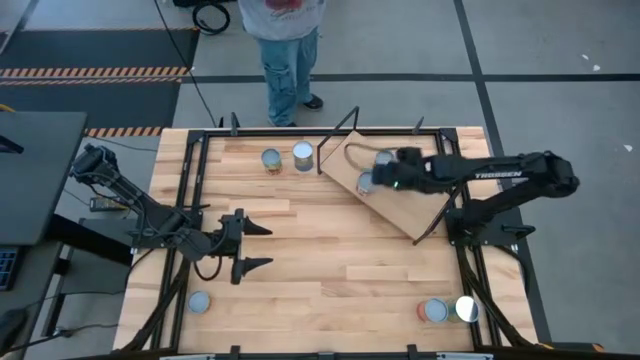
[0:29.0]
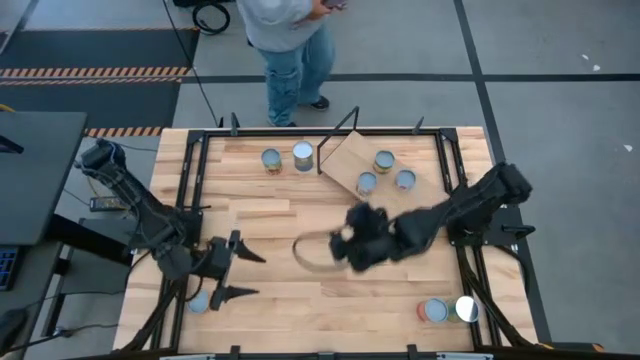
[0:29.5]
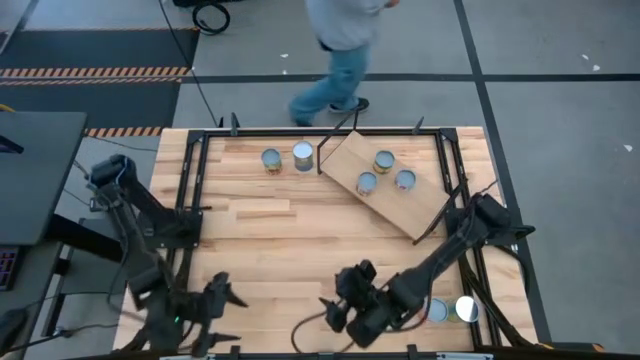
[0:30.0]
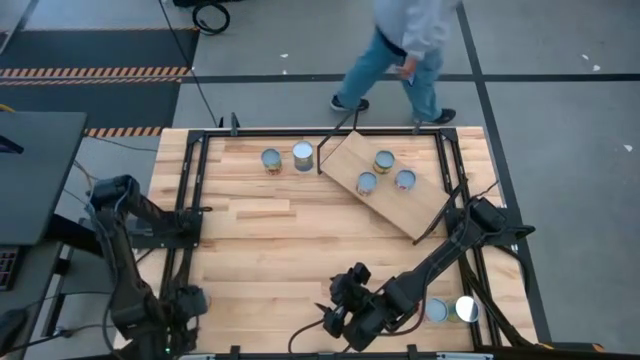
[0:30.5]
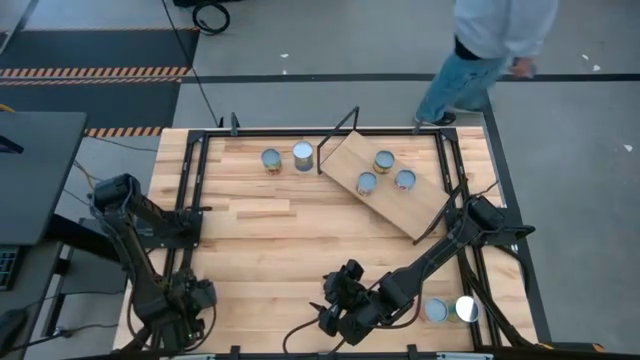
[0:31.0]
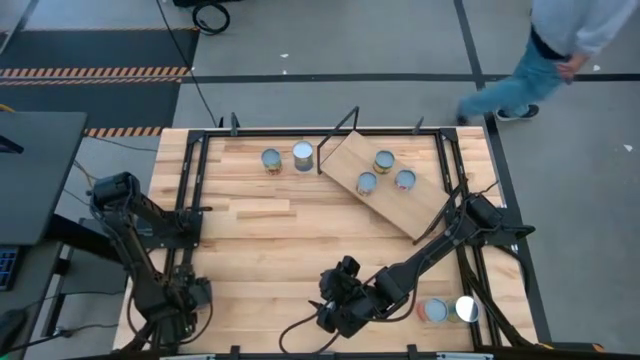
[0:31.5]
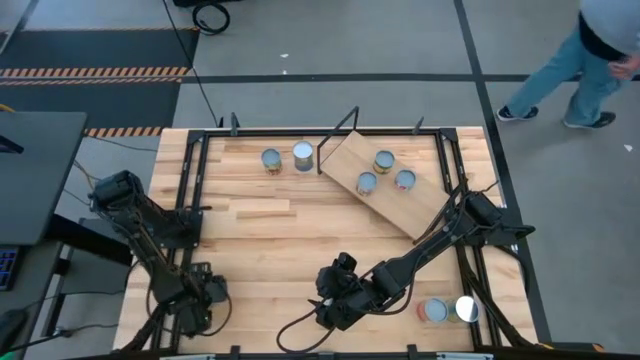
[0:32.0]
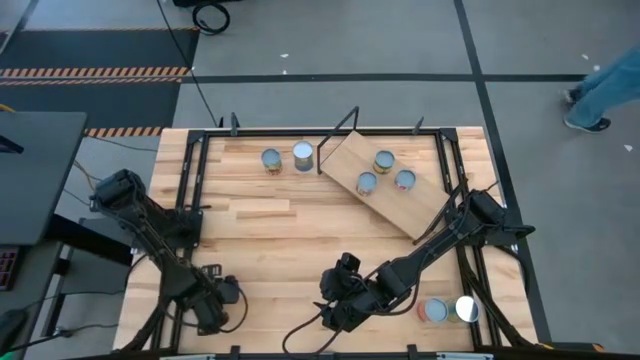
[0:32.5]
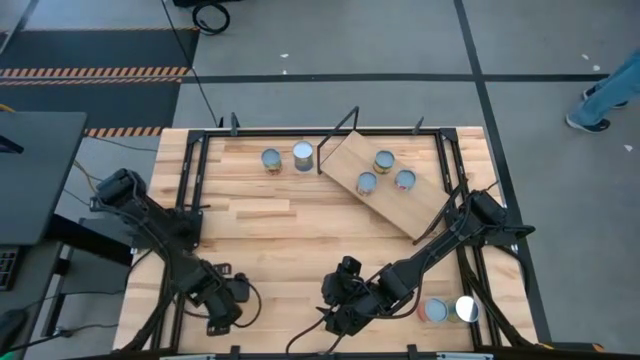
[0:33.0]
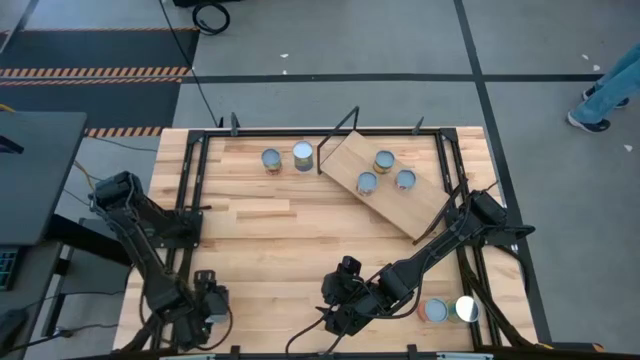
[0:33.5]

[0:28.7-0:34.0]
Task: Pick and place cans onto a shelf
Put the canned pineapple rings on the shelf

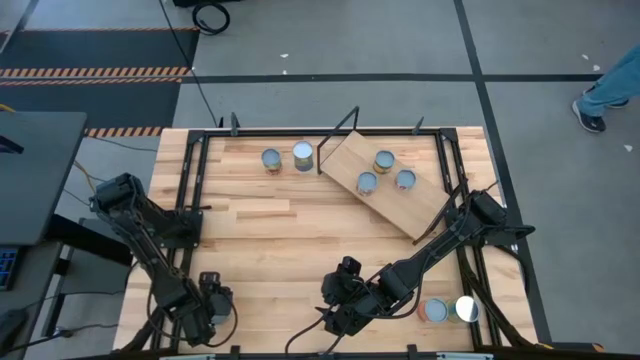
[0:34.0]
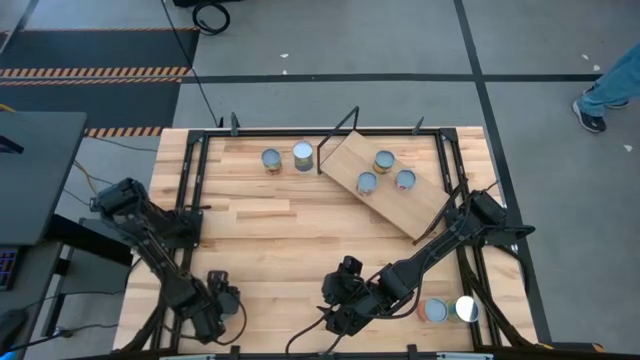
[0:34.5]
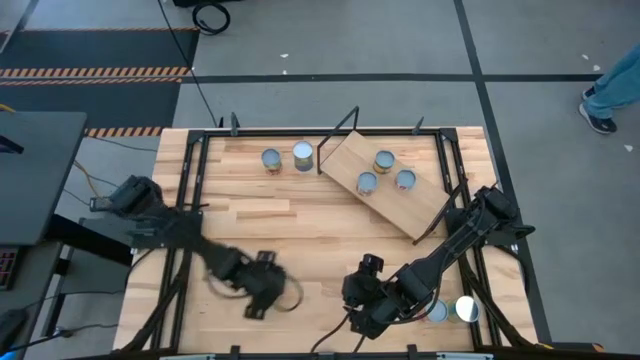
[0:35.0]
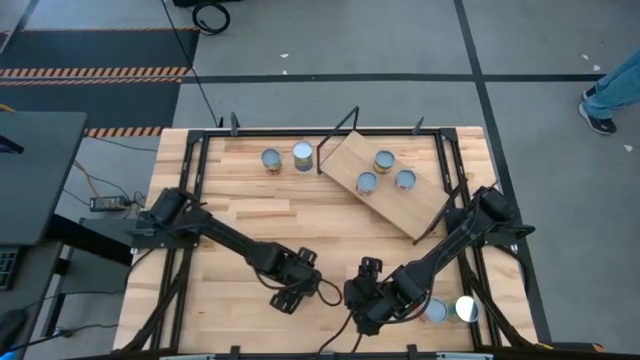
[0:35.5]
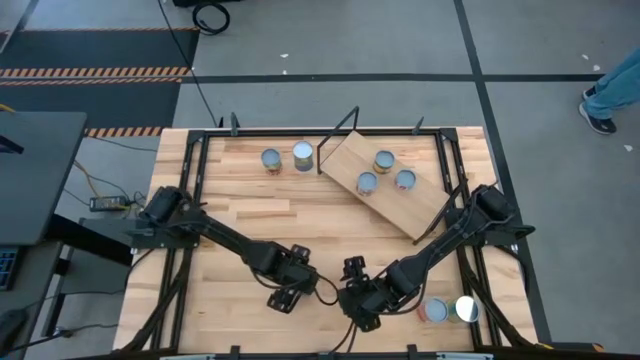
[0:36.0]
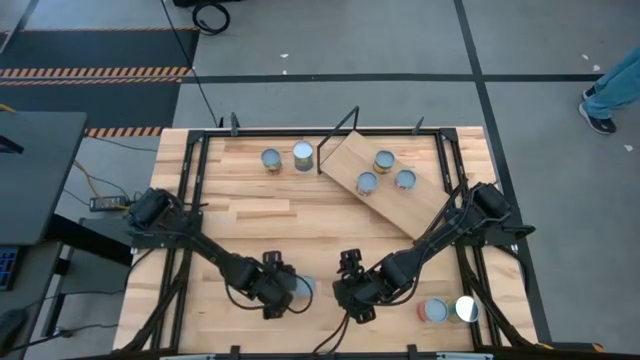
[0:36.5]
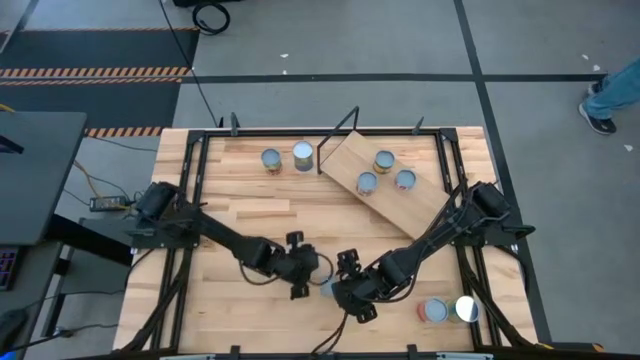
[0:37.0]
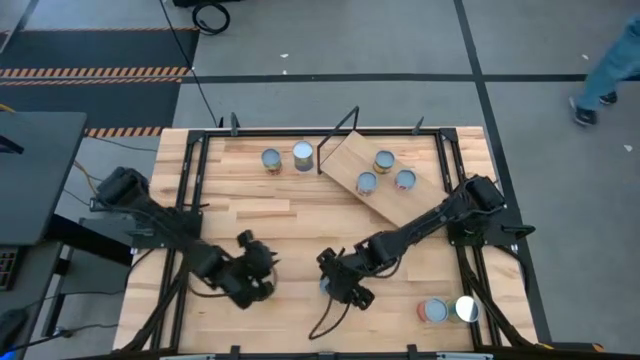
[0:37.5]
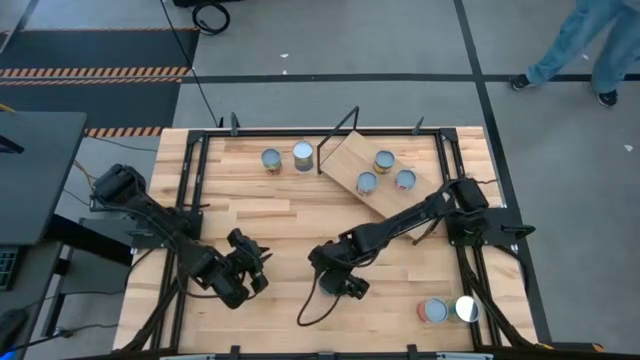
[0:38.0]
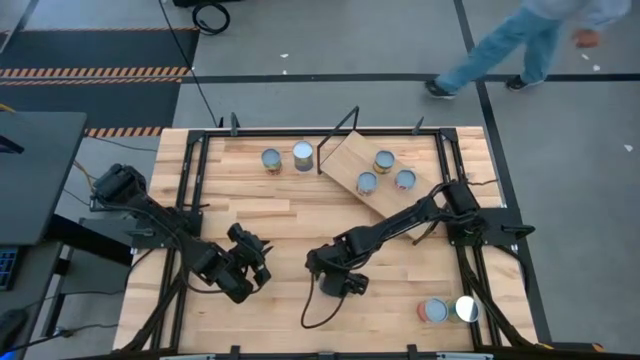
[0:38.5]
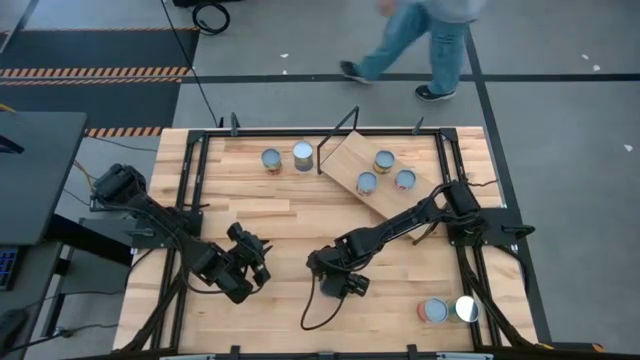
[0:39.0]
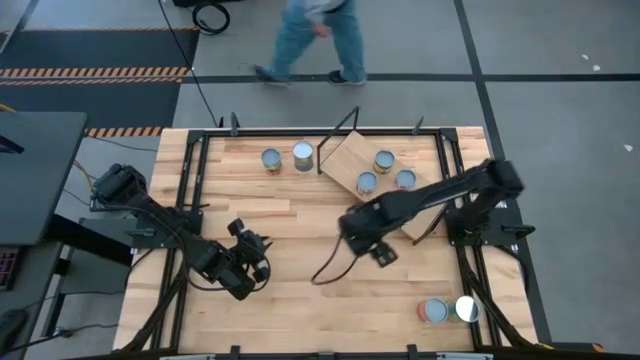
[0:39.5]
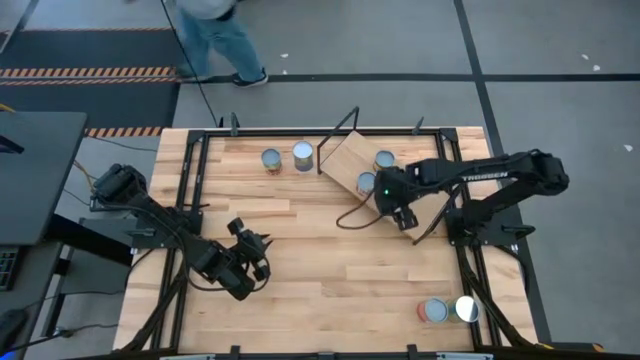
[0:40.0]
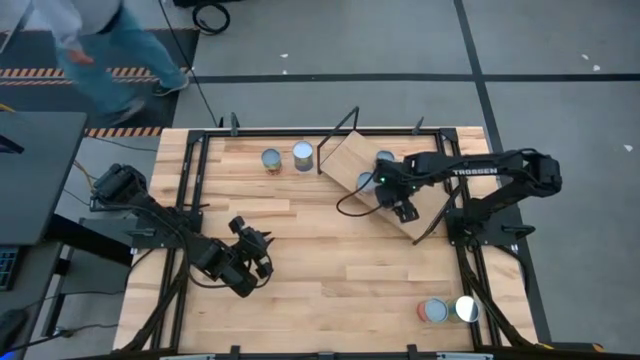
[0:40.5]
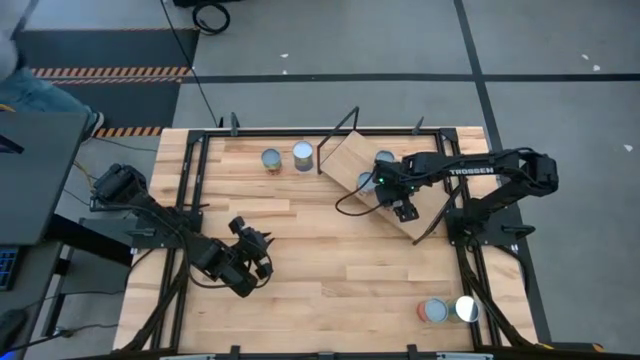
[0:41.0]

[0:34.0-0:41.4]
Put the canned pineapple rings on the shelf aligned with the canned salmon

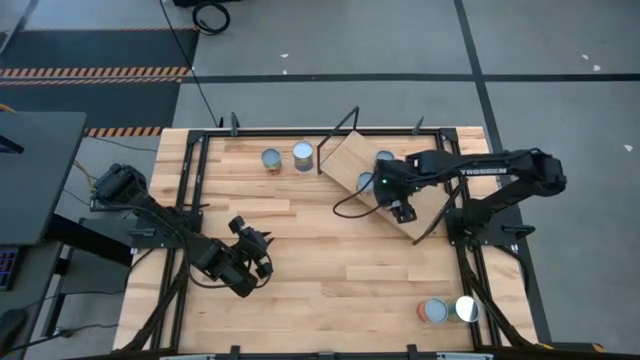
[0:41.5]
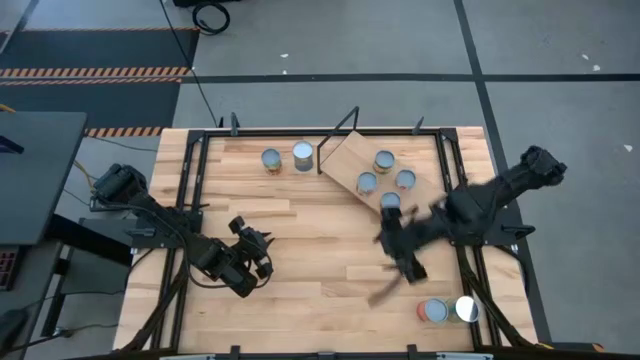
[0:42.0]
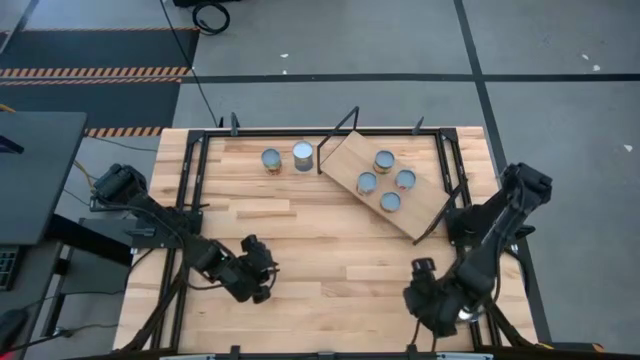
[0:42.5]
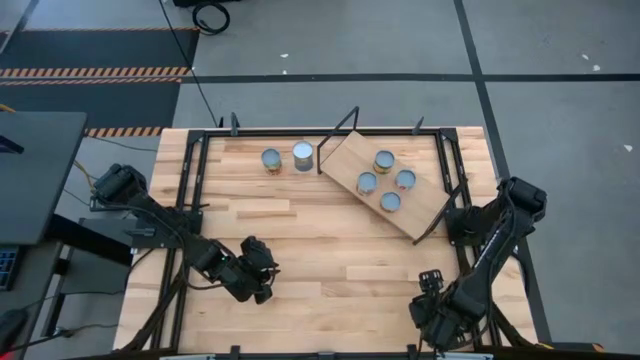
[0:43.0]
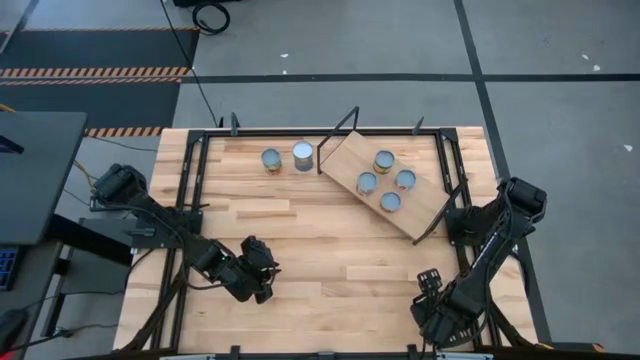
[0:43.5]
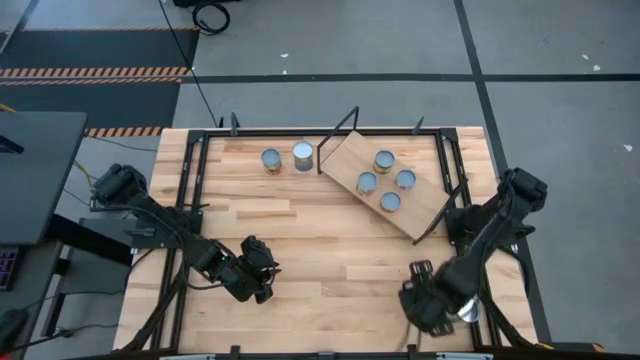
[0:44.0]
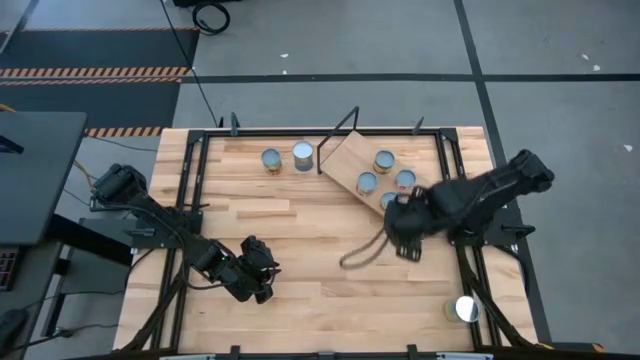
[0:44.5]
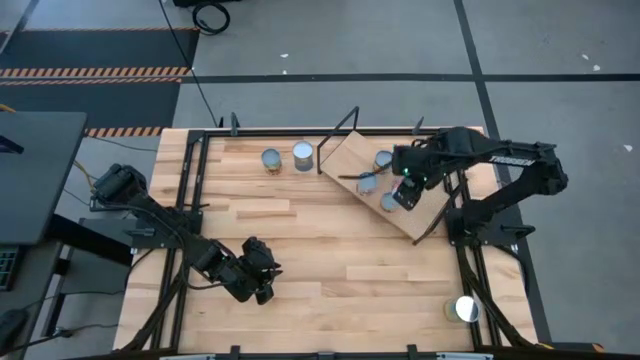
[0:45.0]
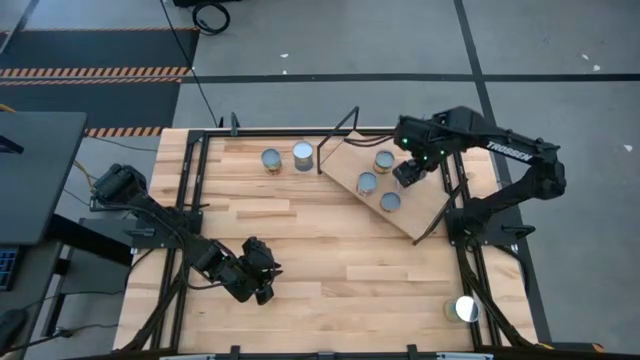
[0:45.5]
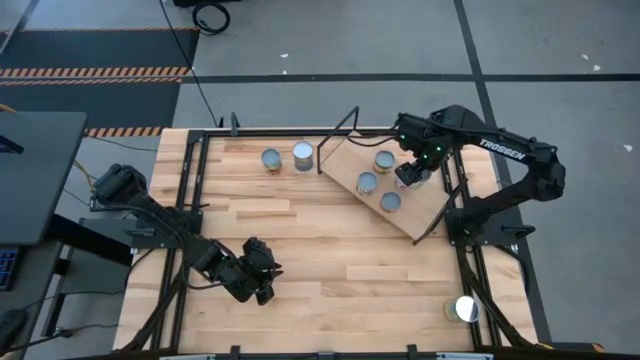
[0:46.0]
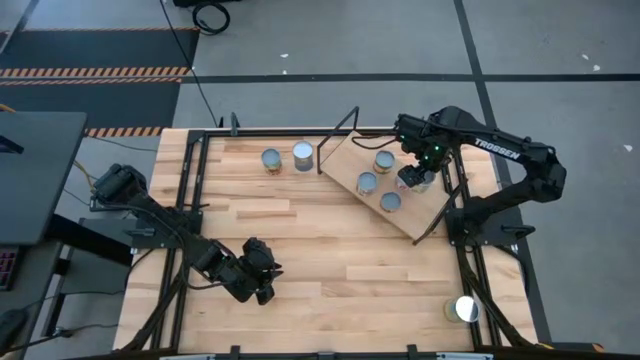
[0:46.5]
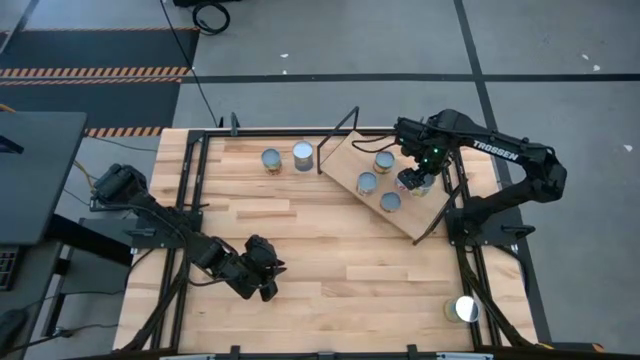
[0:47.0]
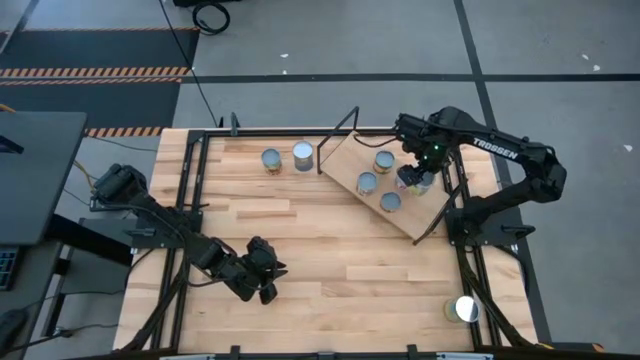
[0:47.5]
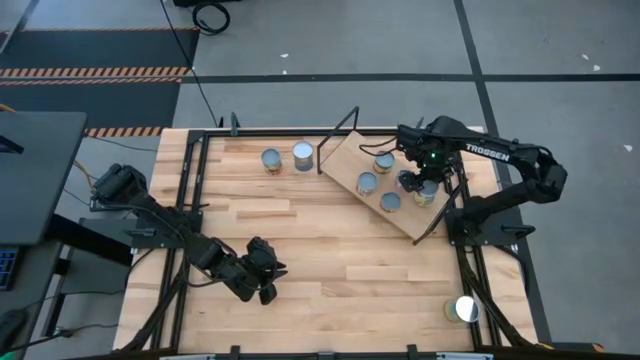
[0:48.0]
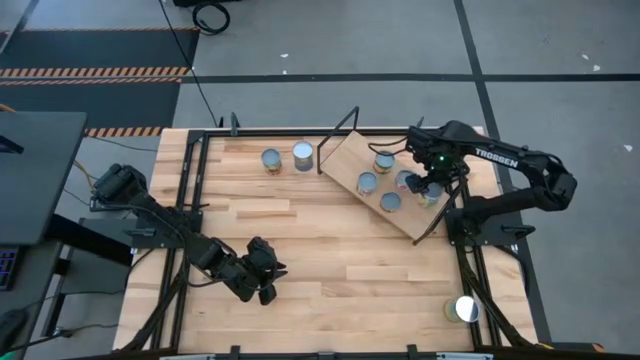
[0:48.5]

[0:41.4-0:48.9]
Put the canned mixed fruits on the shelf
